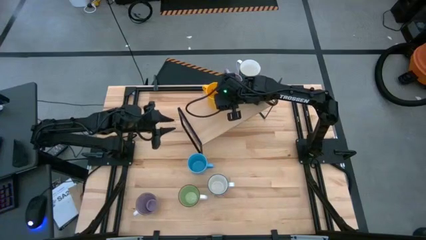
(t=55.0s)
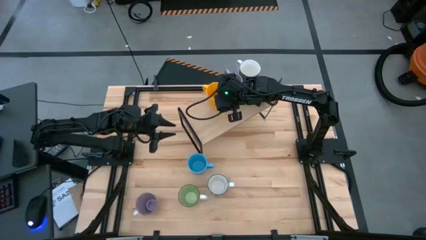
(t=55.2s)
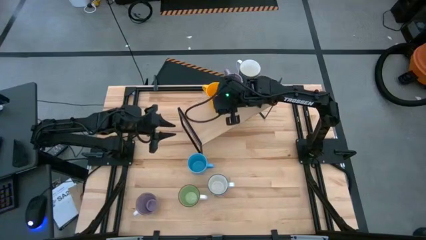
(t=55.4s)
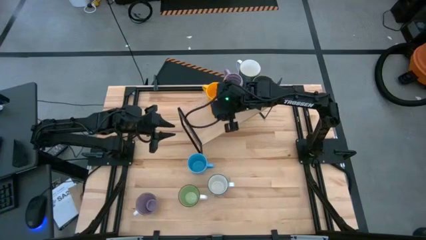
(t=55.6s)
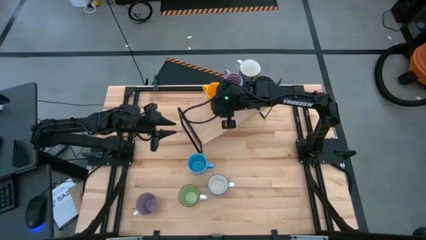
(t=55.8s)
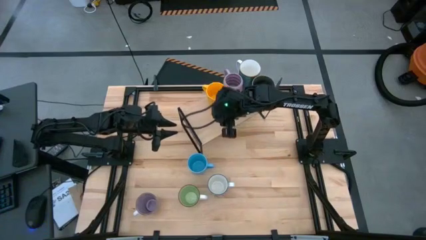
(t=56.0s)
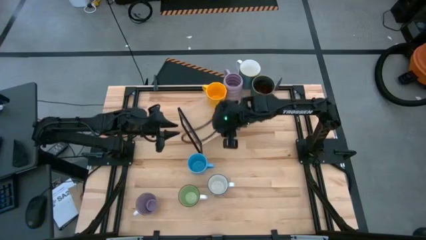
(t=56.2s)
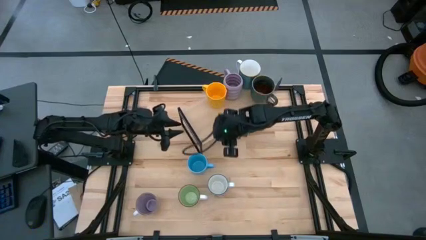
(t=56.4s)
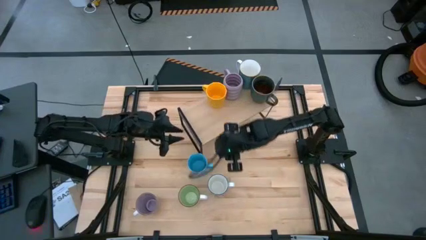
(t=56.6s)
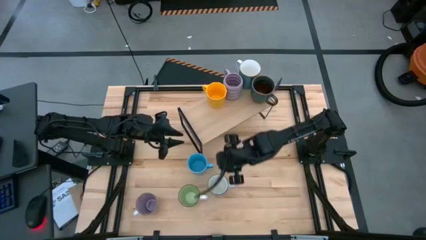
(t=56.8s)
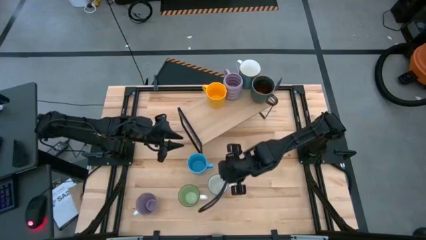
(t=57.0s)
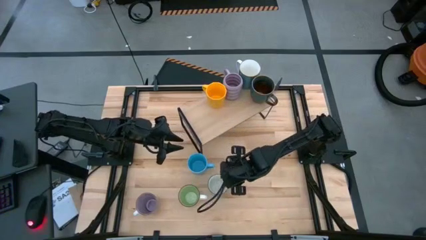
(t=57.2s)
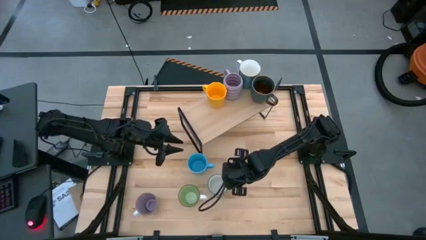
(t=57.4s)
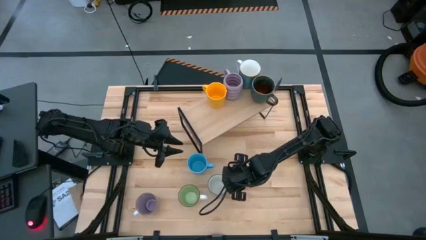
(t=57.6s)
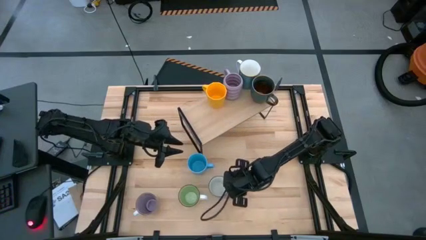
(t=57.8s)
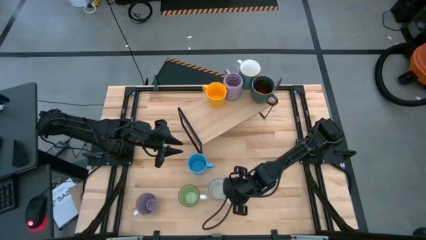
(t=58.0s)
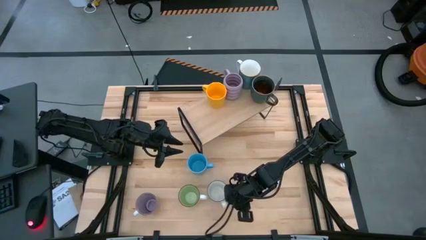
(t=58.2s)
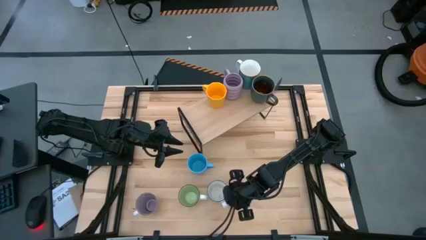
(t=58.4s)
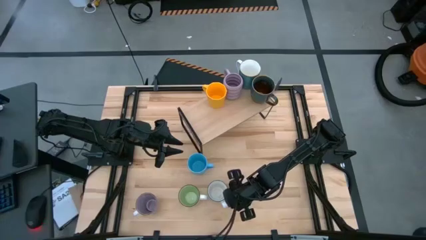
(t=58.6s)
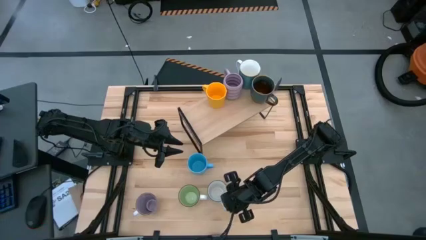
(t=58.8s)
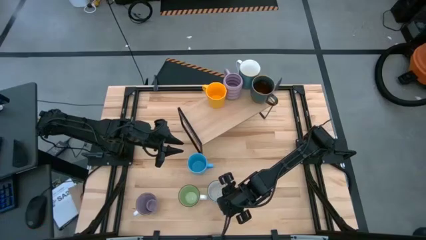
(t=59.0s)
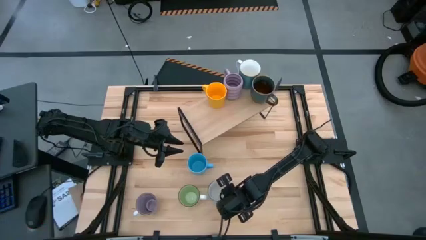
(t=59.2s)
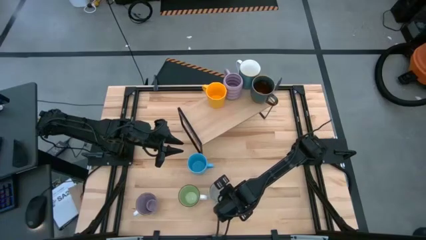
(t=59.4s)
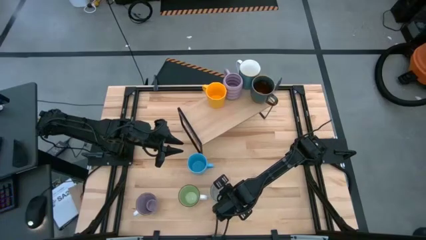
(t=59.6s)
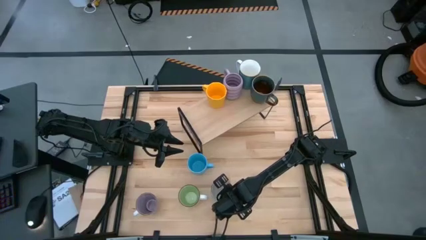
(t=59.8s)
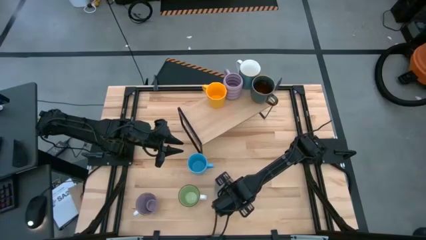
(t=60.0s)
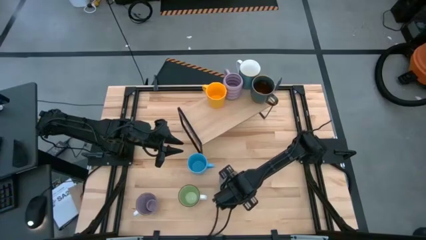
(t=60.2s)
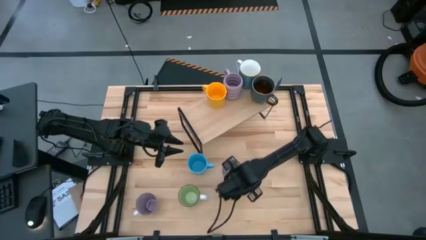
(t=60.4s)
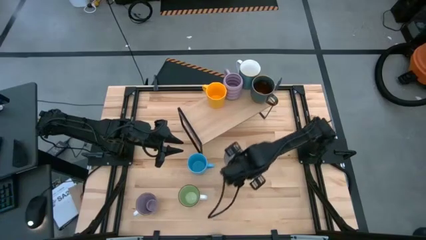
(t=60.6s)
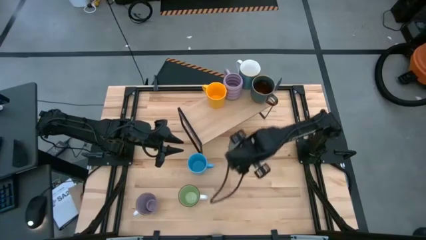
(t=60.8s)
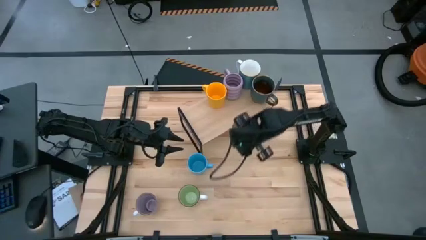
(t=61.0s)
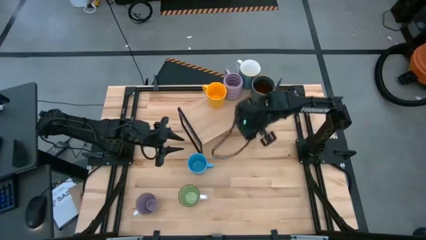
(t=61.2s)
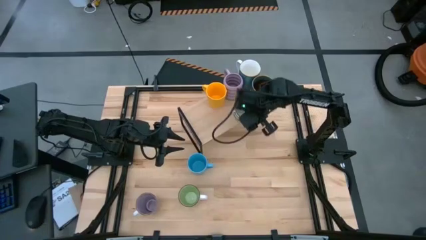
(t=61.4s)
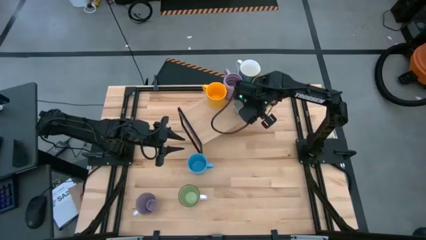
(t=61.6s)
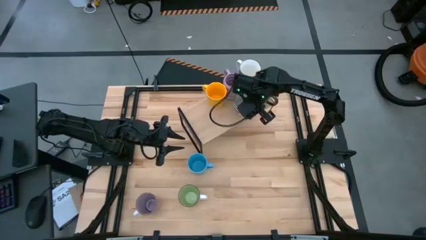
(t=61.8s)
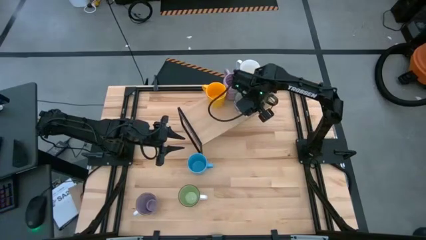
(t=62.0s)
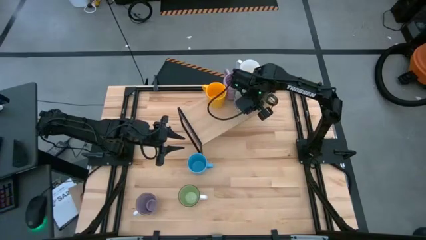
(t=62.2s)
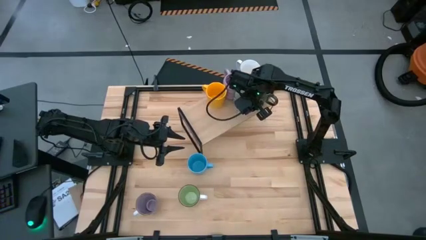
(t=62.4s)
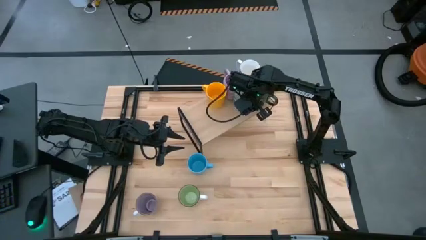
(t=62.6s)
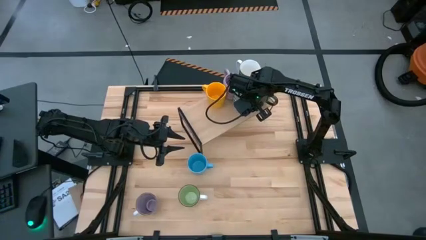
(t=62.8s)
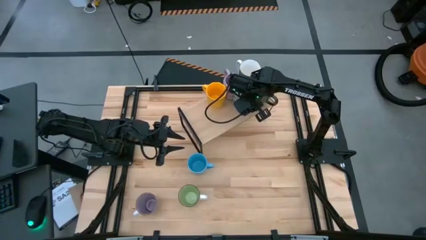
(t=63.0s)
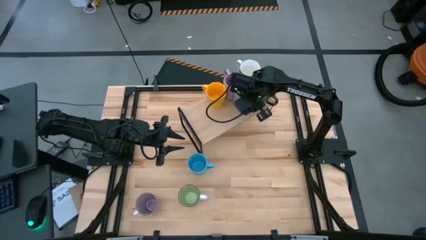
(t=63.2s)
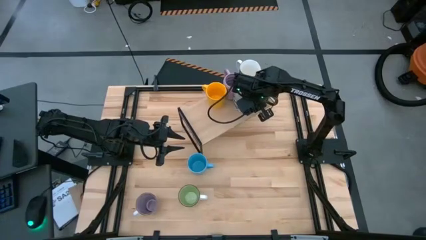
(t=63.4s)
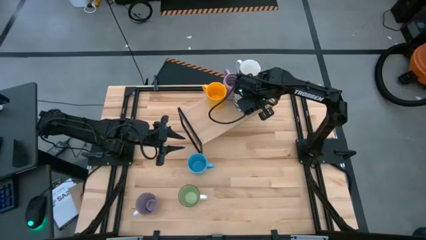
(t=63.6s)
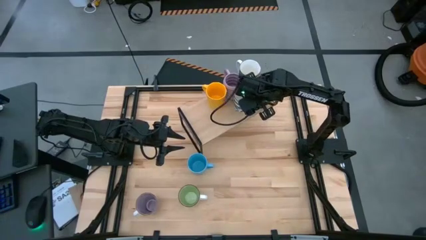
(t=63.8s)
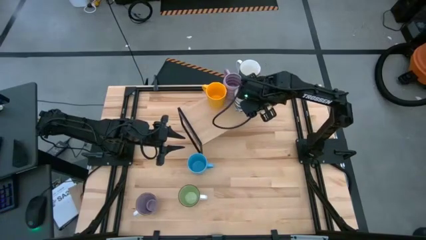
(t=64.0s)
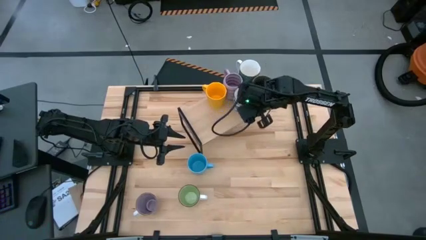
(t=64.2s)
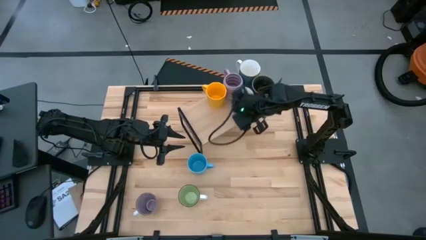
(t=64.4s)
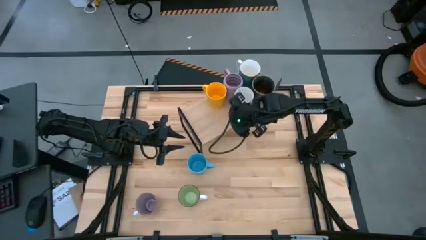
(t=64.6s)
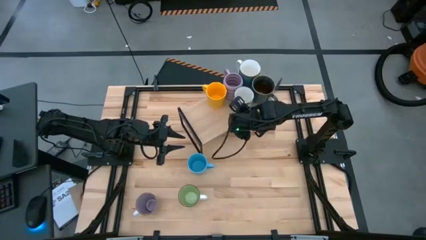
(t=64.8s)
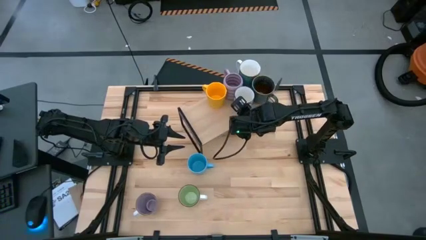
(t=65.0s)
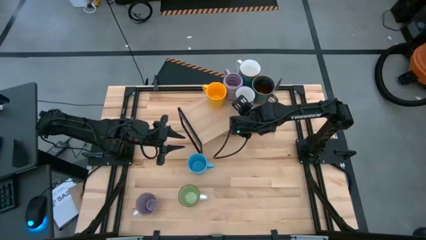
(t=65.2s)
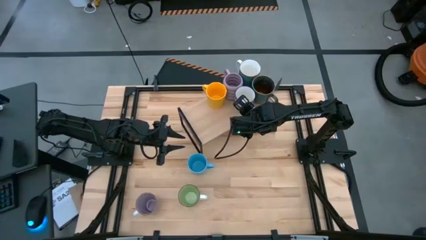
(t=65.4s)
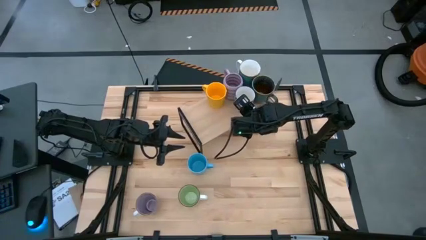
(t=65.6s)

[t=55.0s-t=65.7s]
Task: Place coffee mugs
Put the white and blue mug on the shelf

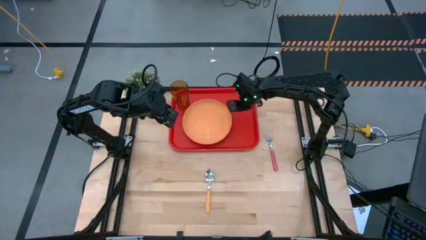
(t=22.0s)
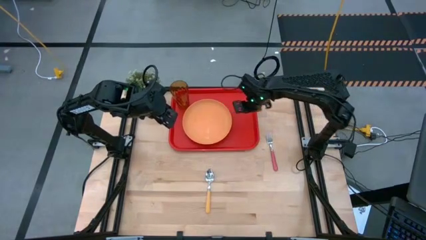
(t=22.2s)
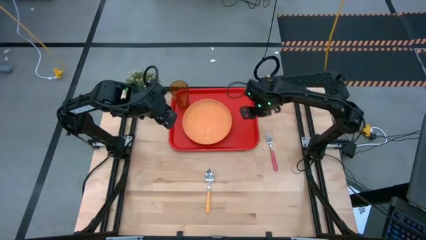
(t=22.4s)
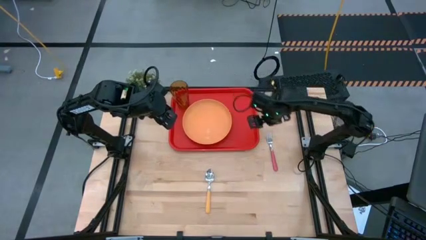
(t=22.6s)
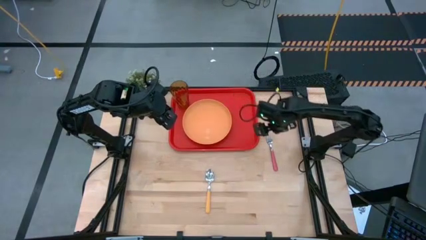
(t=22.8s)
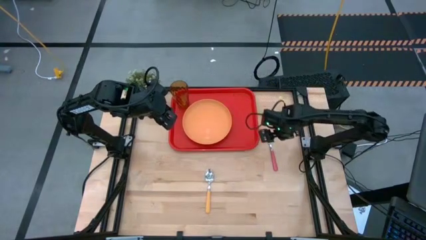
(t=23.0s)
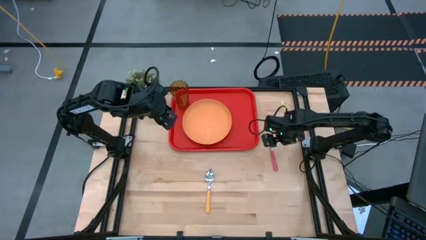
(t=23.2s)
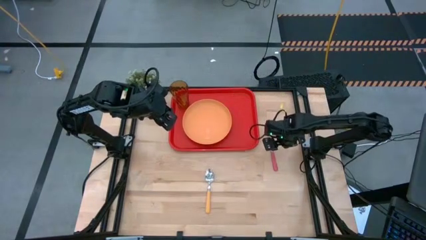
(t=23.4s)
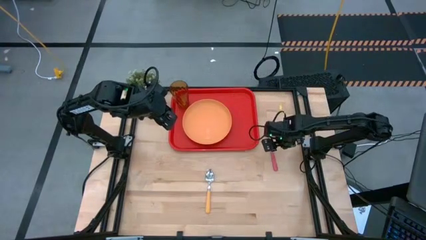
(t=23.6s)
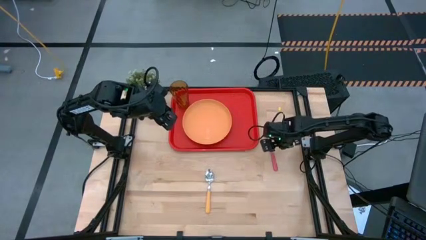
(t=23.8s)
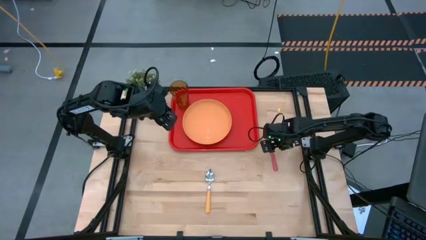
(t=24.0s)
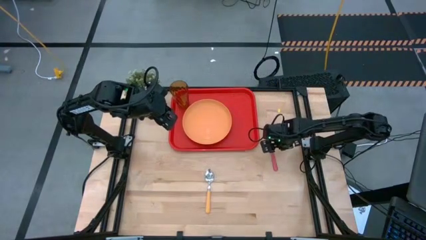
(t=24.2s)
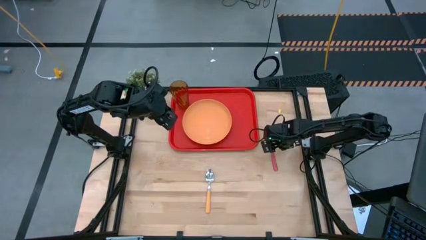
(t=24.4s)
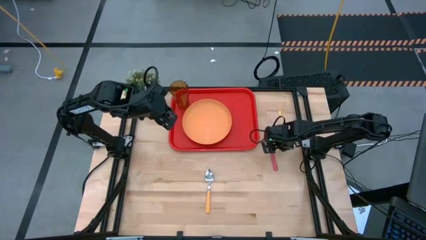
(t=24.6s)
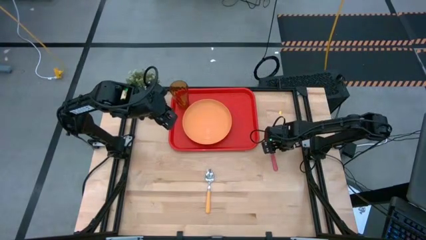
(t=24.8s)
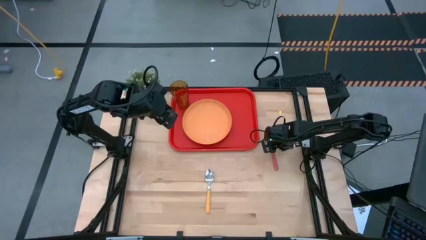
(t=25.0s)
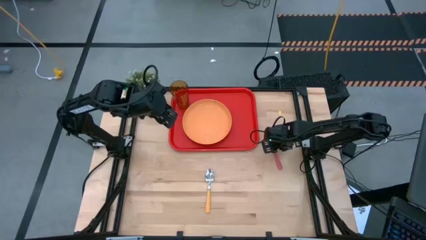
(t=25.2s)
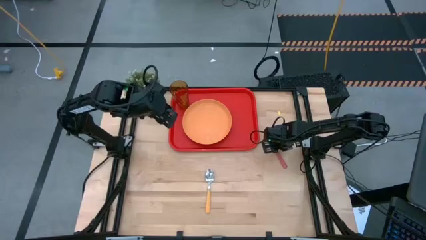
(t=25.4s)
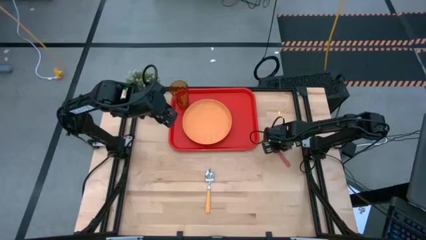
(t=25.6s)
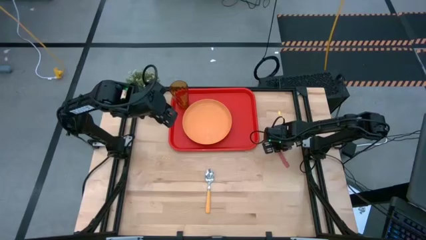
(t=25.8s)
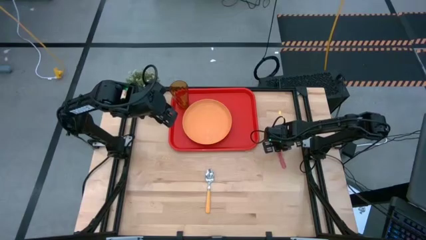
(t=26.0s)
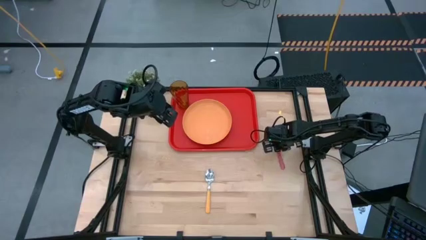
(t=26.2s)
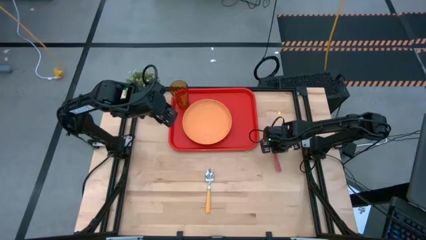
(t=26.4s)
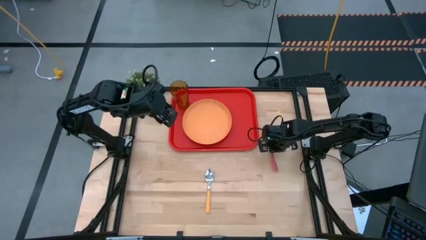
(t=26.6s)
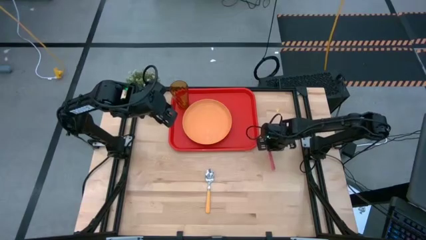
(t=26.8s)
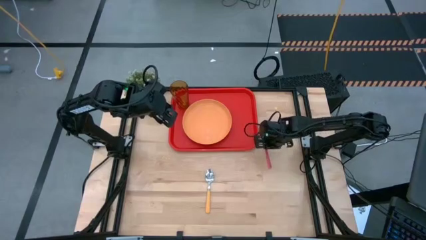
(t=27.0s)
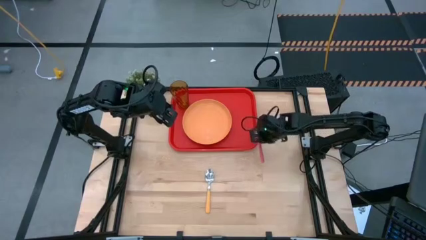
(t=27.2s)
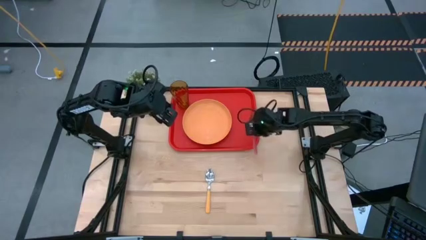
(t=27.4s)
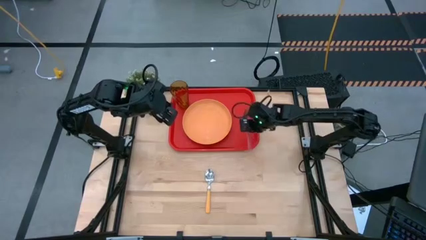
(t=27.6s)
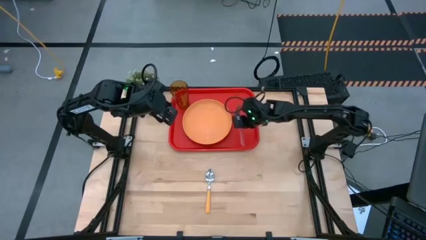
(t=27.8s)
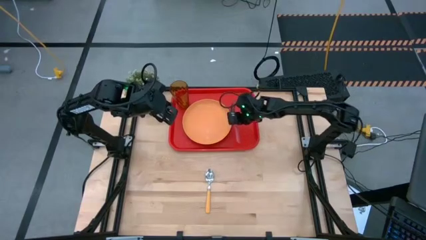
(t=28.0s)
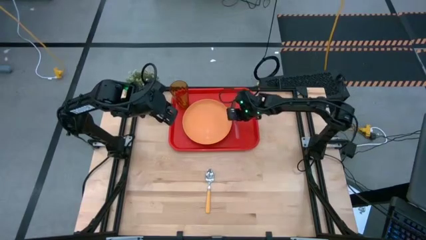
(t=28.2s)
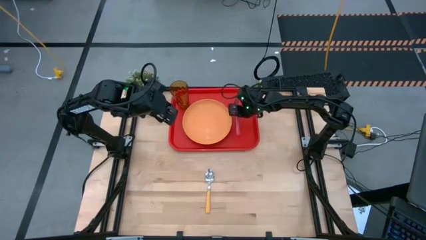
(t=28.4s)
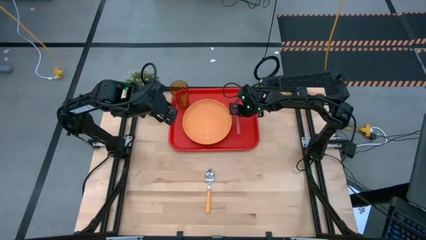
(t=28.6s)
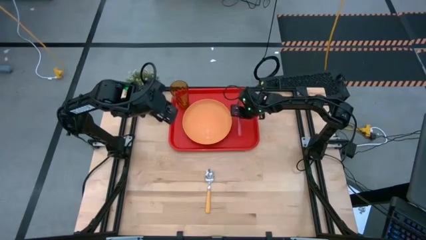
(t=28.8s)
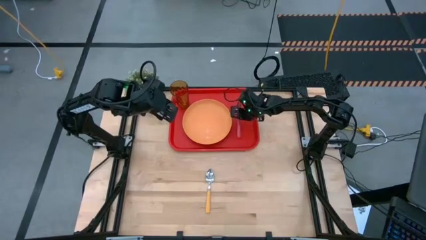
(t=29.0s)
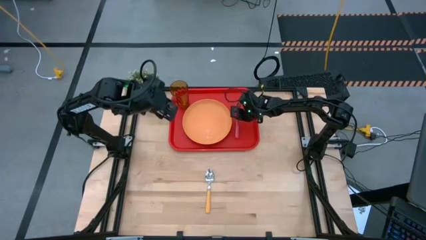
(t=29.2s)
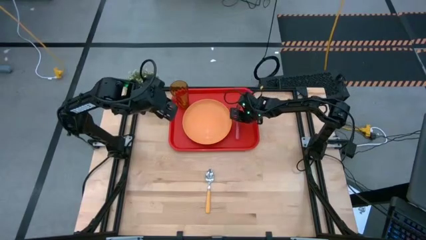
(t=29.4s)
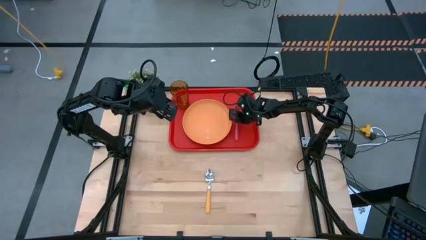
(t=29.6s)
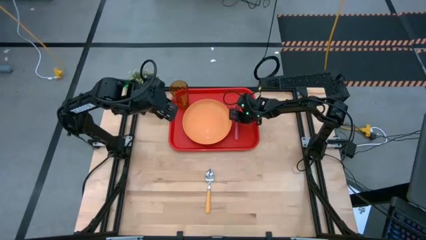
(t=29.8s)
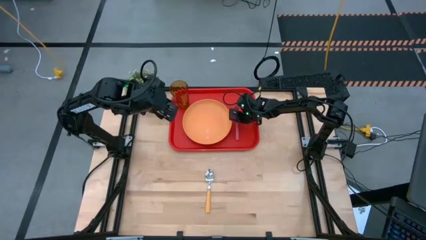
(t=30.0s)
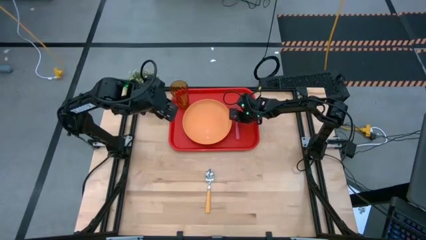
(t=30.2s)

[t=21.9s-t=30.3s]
Task: Pick and place plate/cup/fork/spoon on tray
Put the red fork on the red tray
